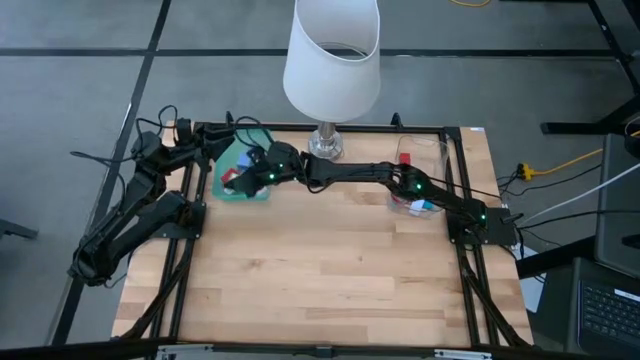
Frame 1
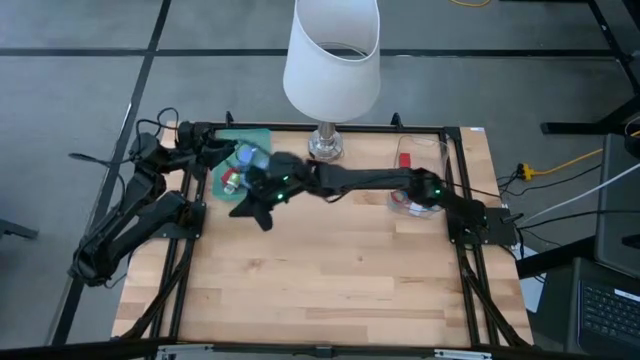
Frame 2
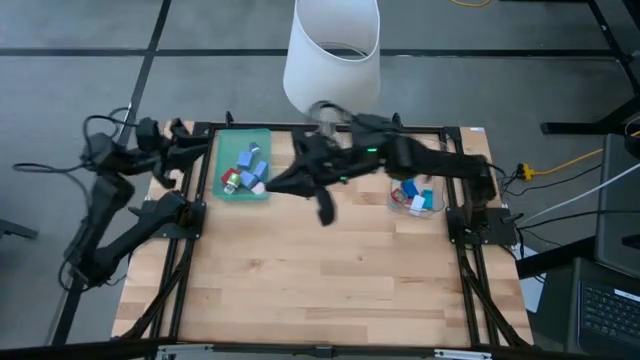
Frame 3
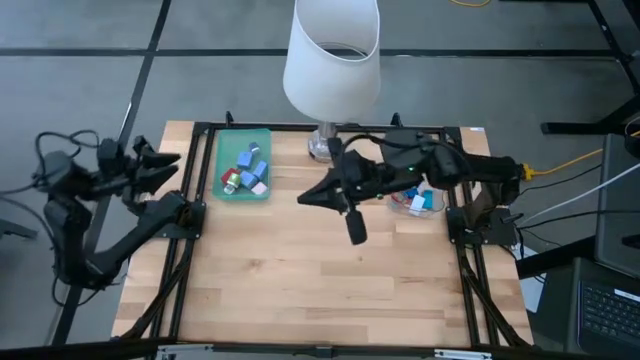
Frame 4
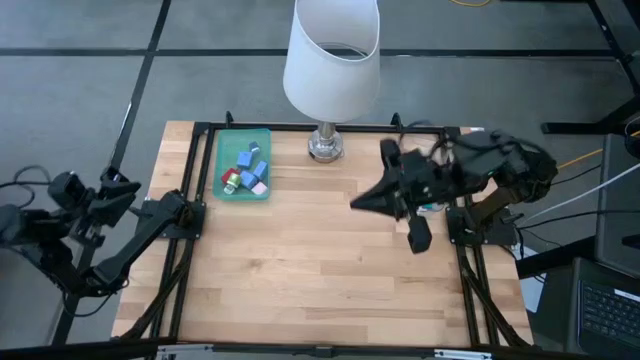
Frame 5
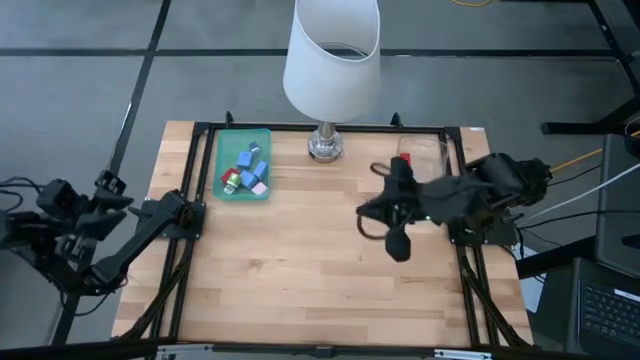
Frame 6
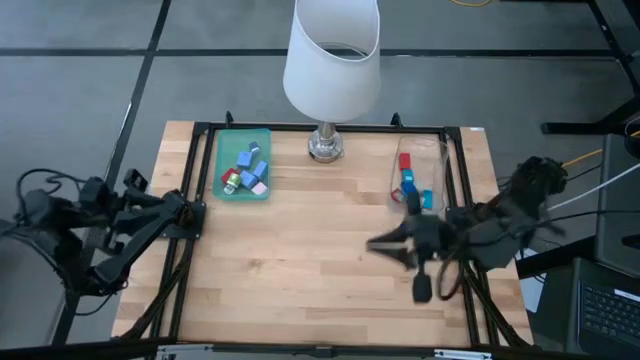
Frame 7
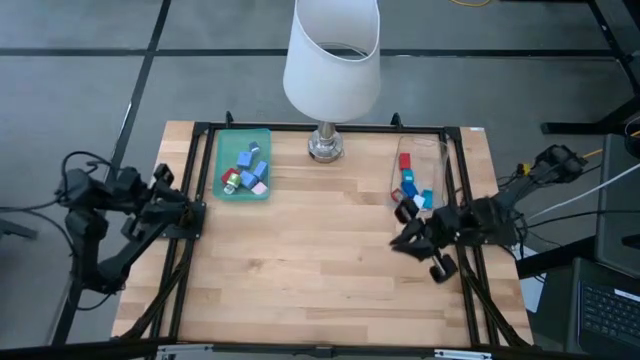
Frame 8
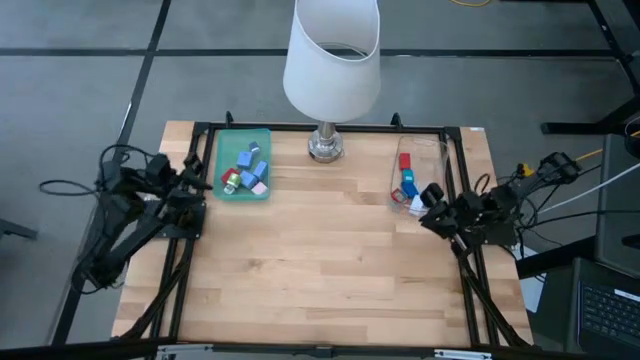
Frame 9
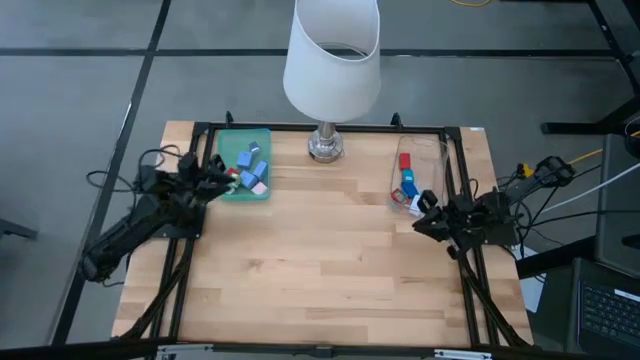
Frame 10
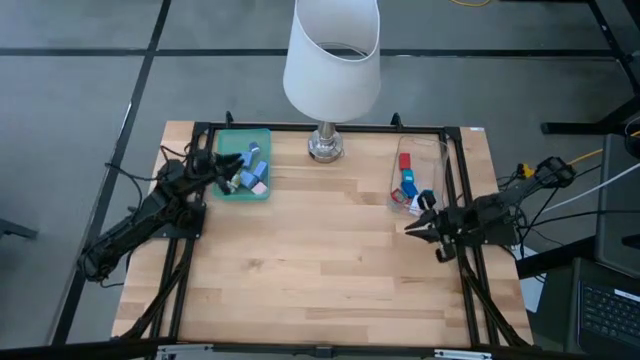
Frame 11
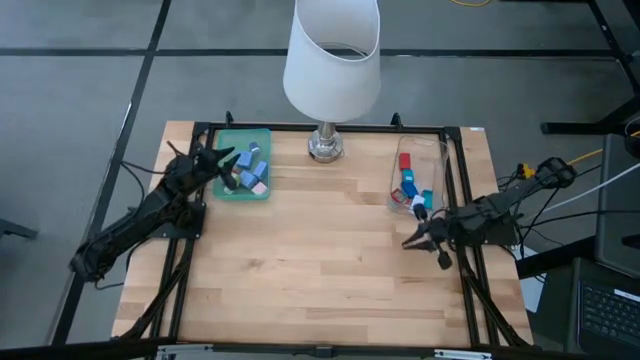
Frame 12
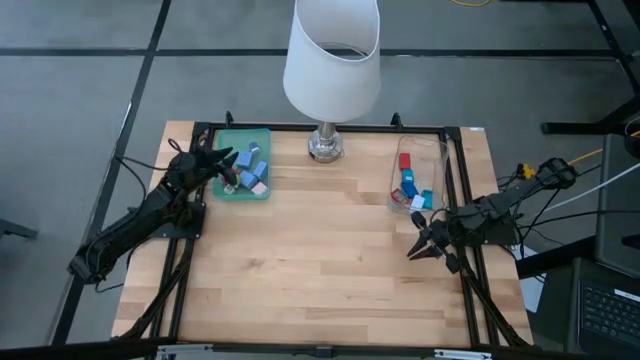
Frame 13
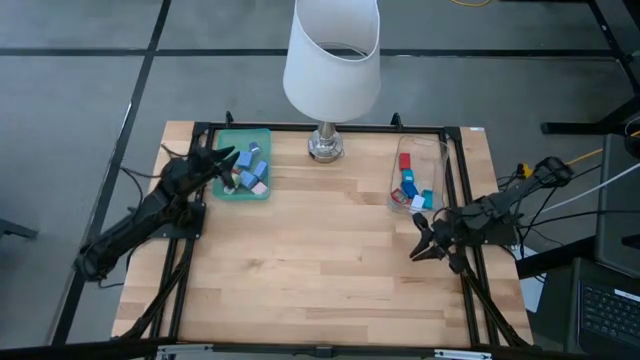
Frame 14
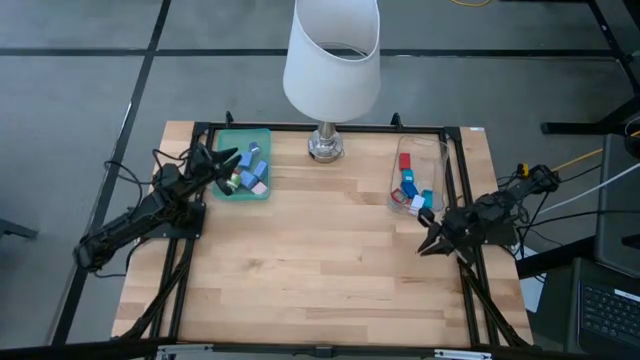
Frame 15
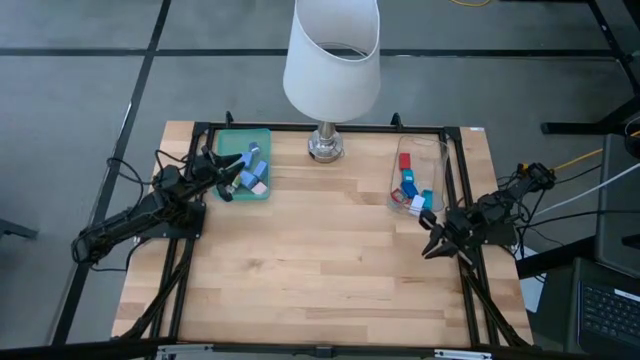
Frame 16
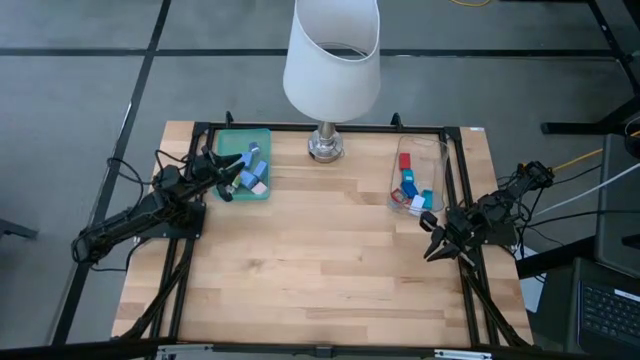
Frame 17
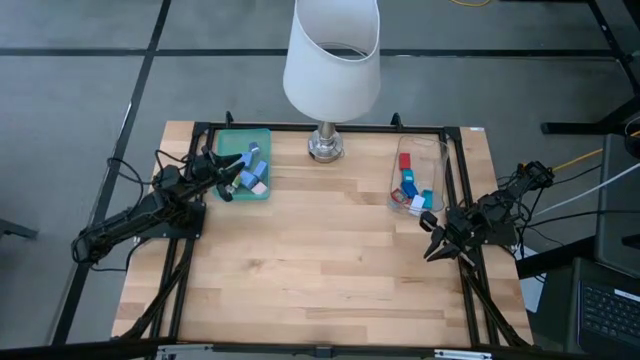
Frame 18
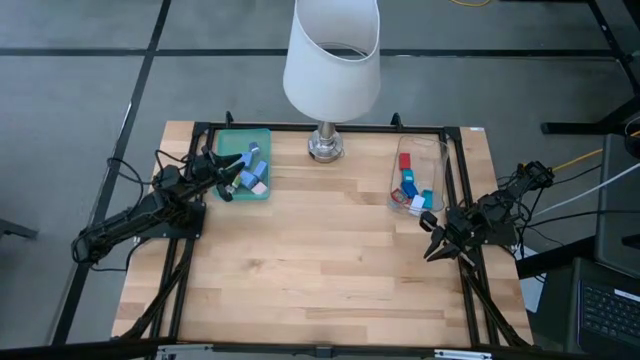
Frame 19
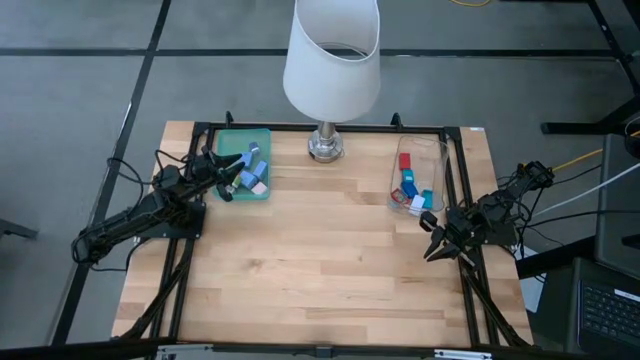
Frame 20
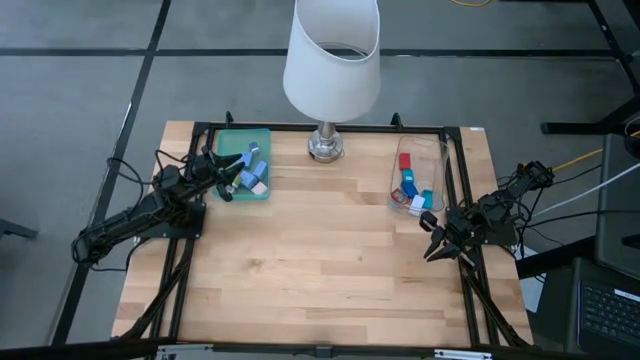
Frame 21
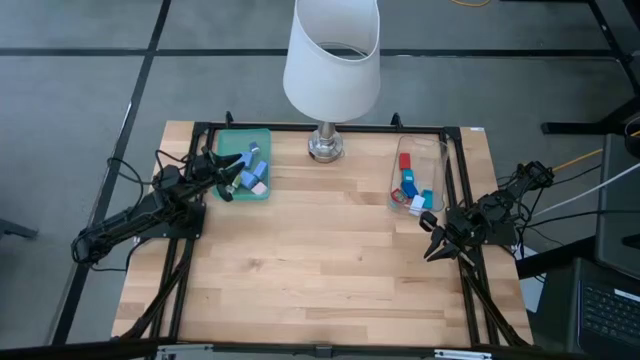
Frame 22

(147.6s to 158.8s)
Task: Pick & Place Office items
Return to Home Position

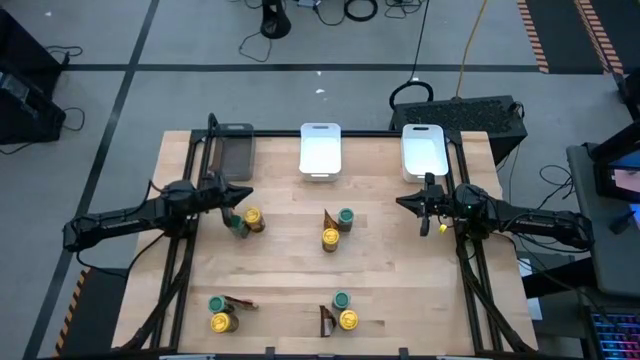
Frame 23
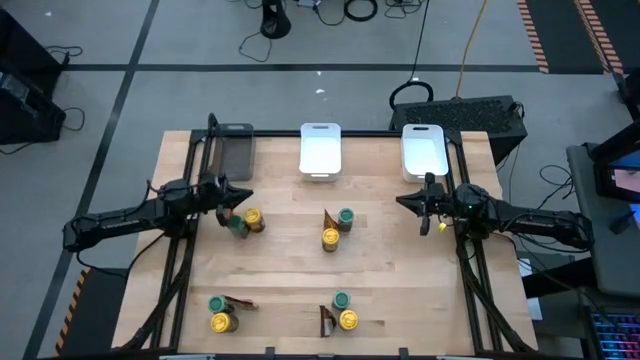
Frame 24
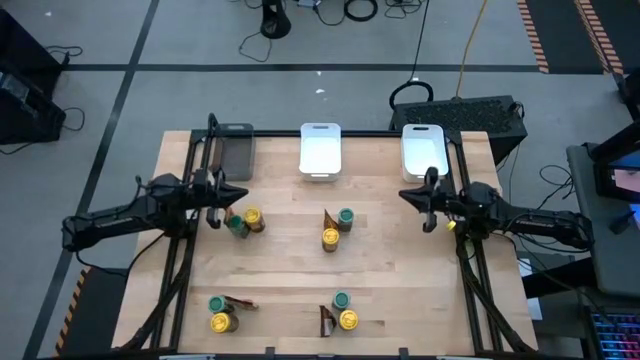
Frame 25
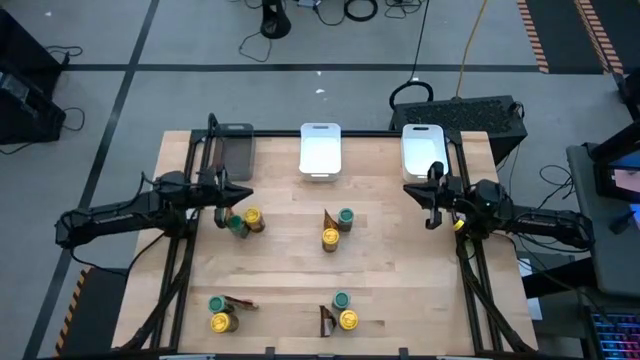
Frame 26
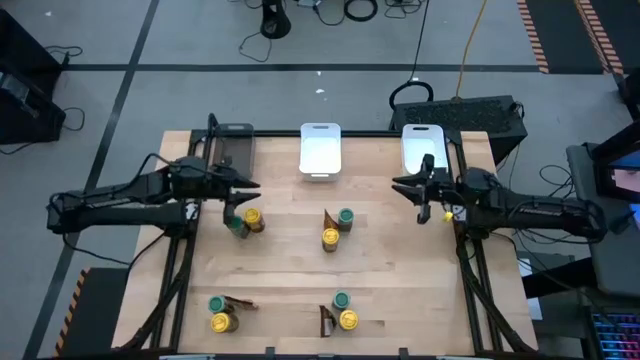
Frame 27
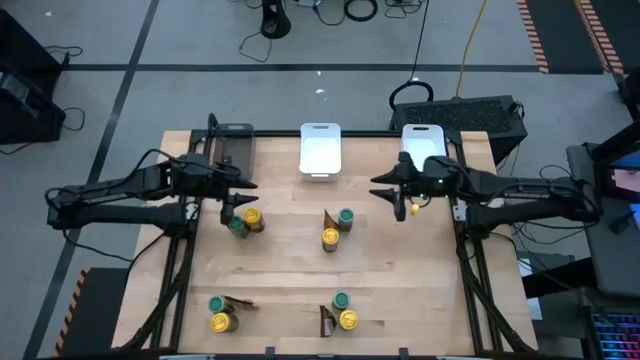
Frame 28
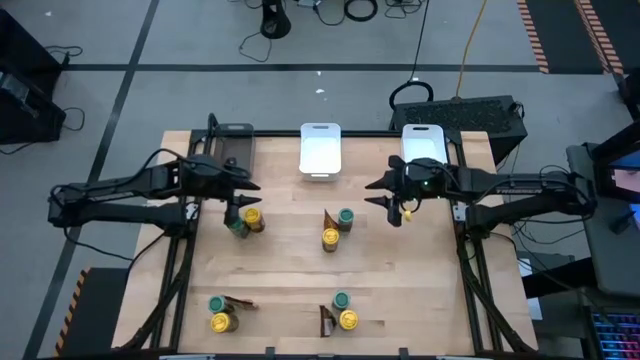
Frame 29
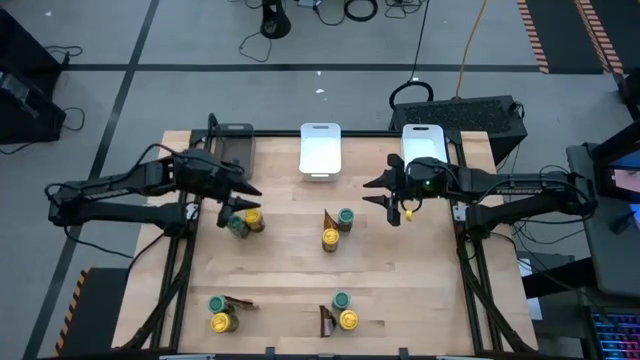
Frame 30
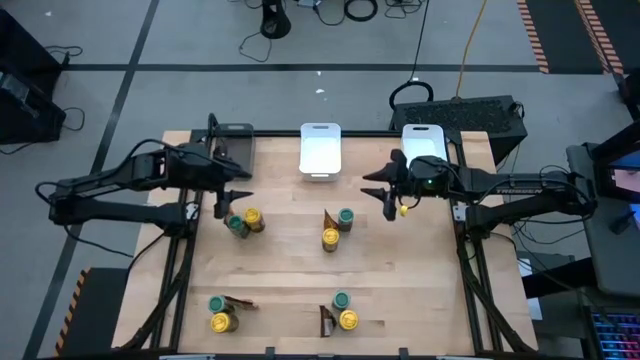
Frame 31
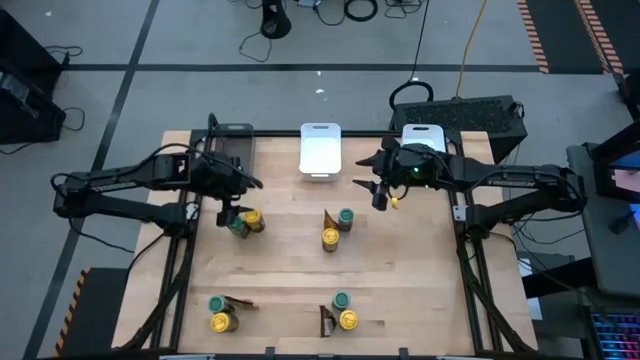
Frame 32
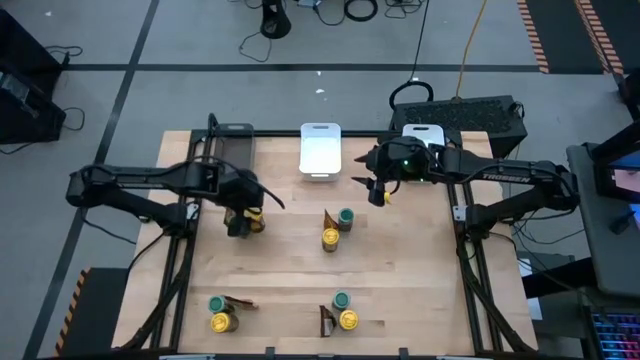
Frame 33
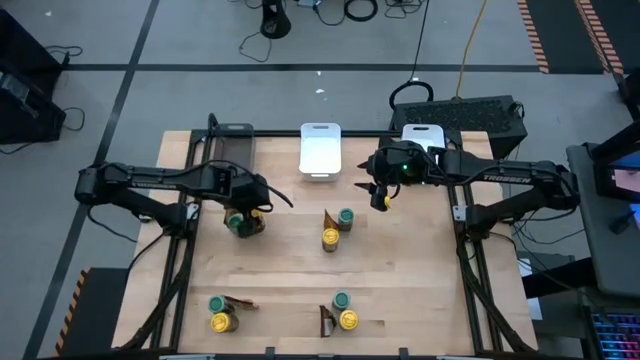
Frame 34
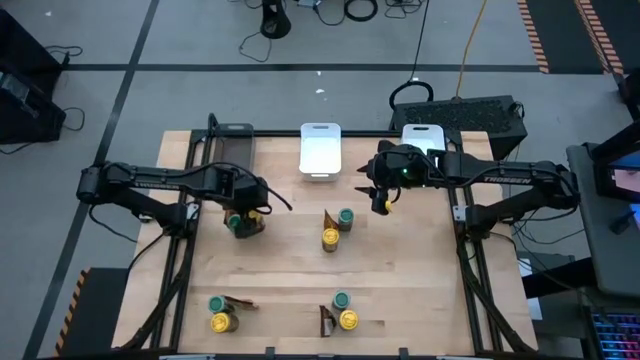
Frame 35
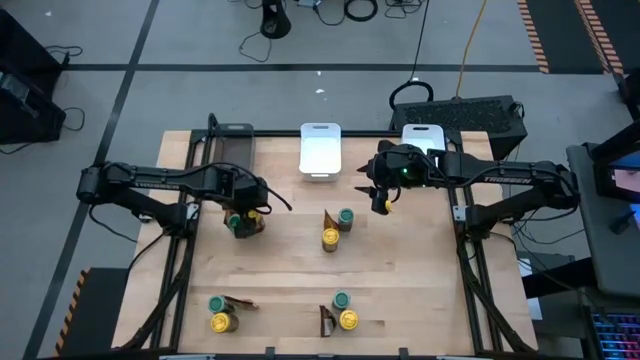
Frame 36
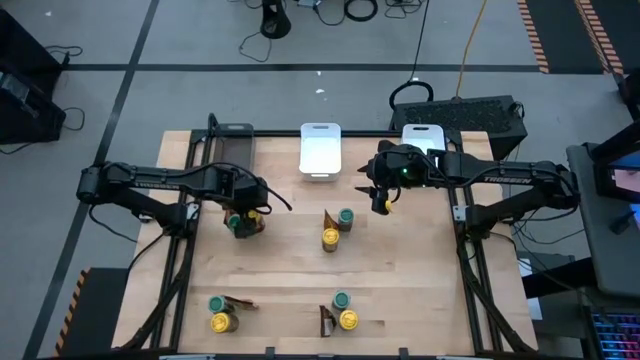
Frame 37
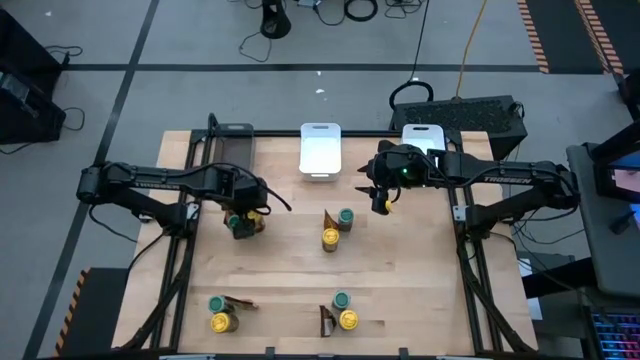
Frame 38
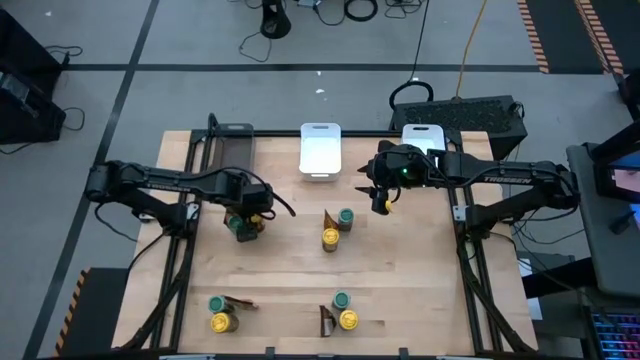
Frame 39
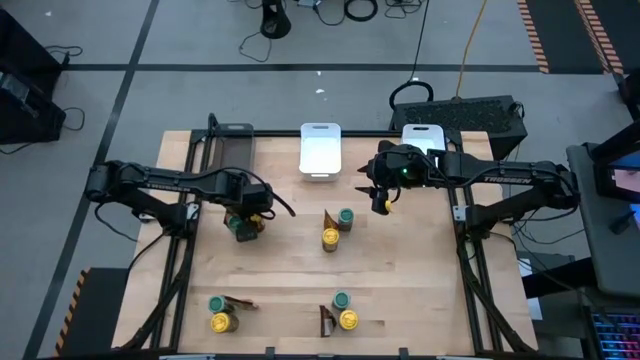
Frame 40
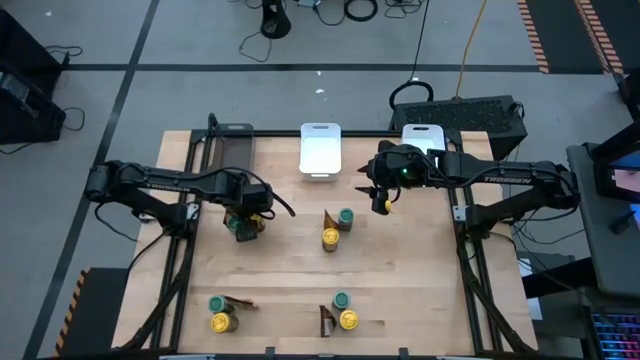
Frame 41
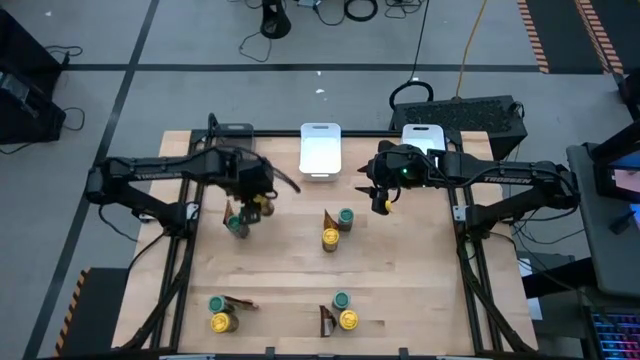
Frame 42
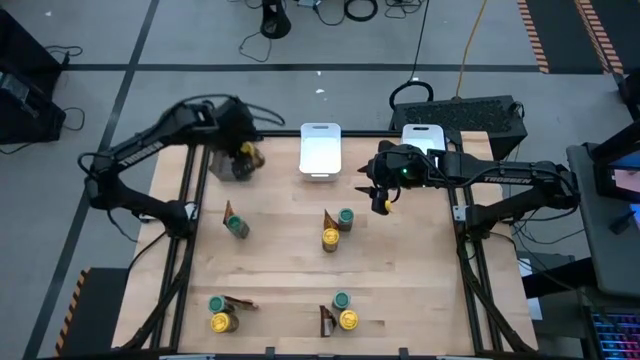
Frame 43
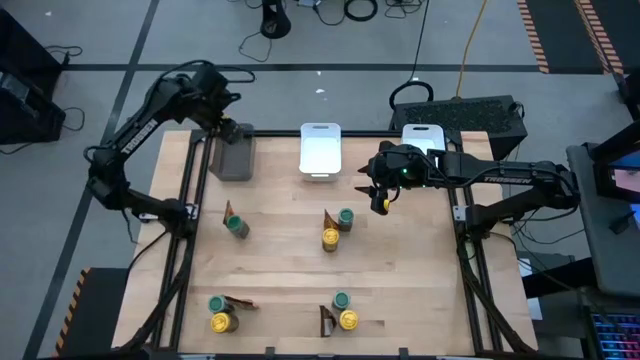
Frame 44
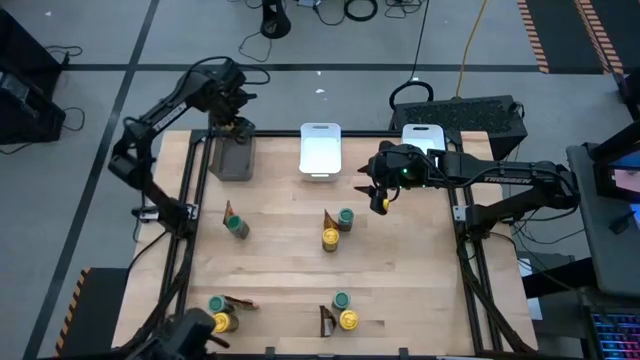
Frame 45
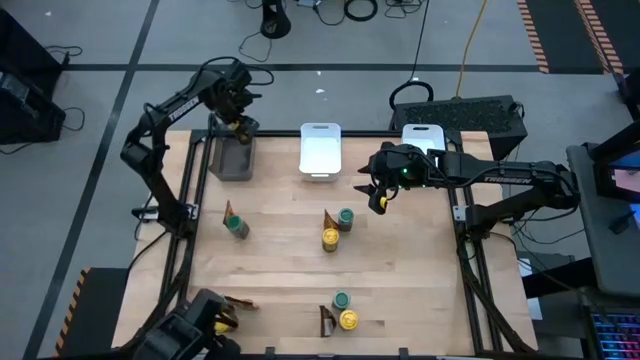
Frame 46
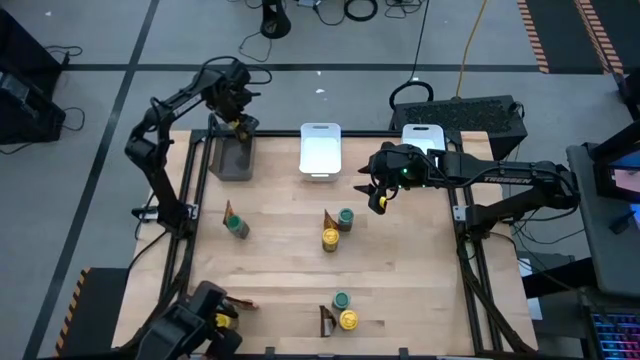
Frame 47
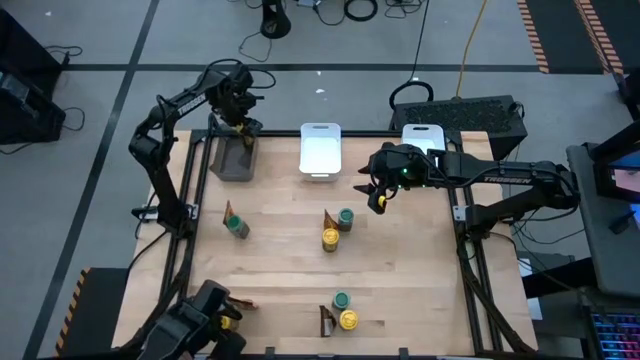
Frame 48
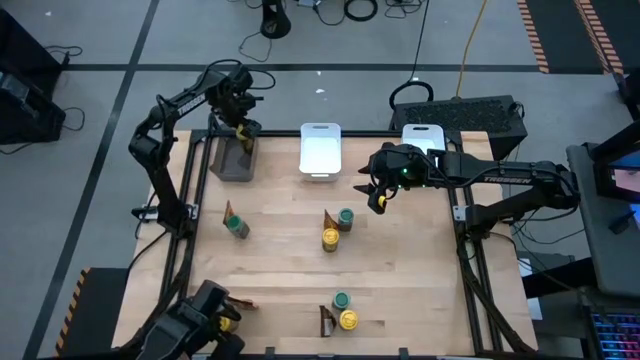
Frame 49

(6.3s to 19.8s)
Task: Sort spices by type
Put the top left yellow seasoning bottle into the black bin
